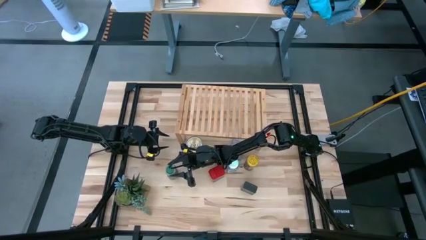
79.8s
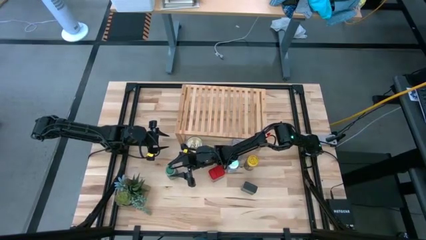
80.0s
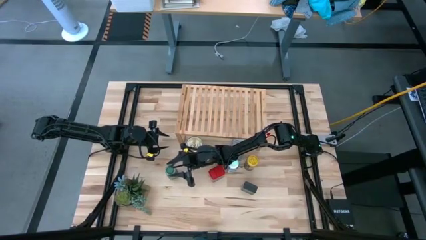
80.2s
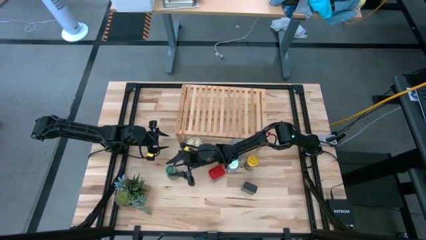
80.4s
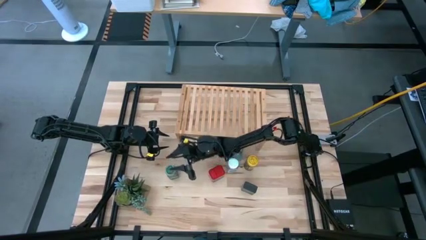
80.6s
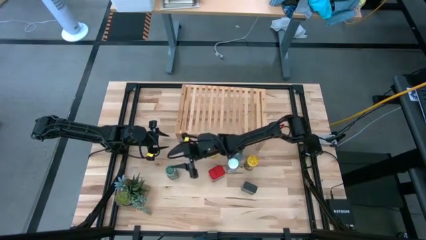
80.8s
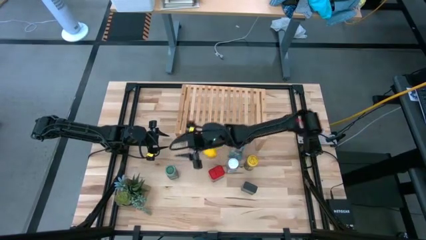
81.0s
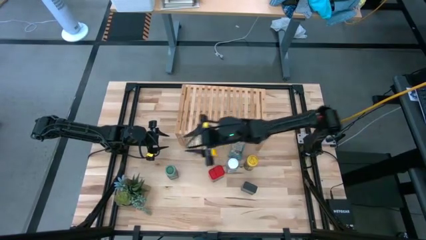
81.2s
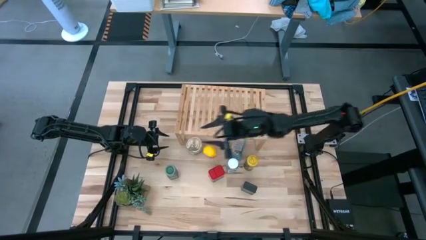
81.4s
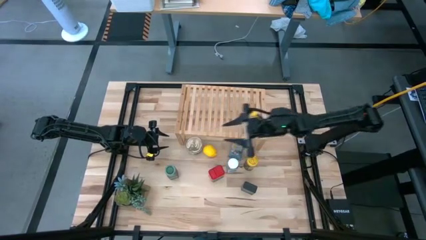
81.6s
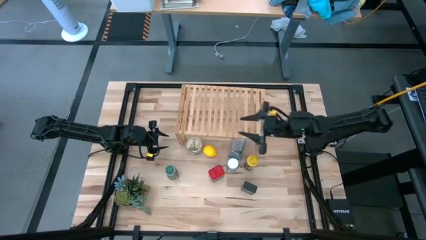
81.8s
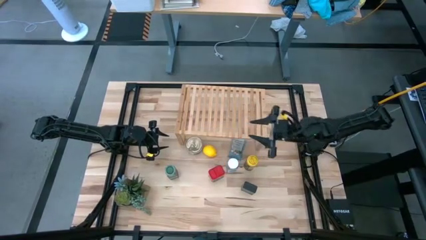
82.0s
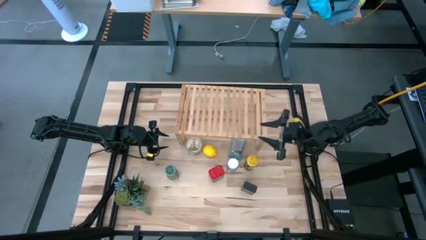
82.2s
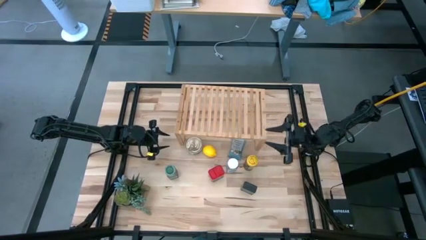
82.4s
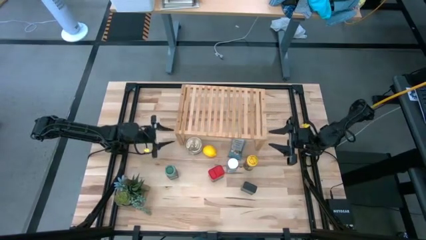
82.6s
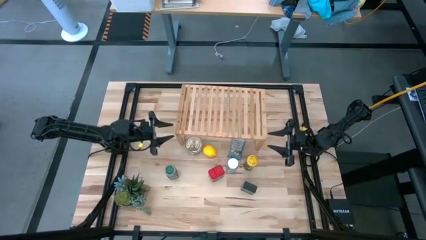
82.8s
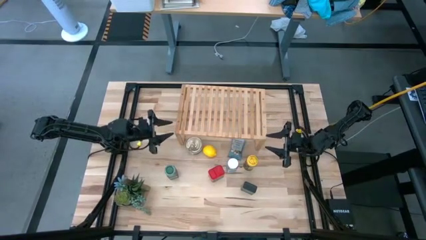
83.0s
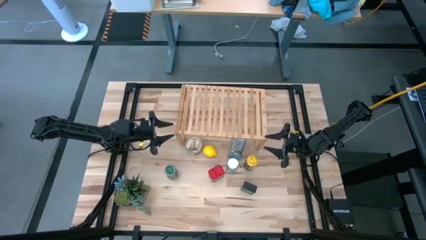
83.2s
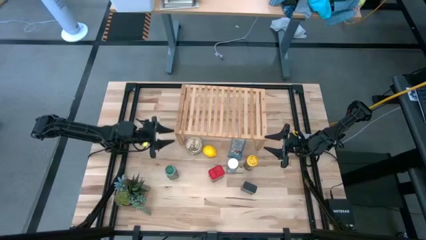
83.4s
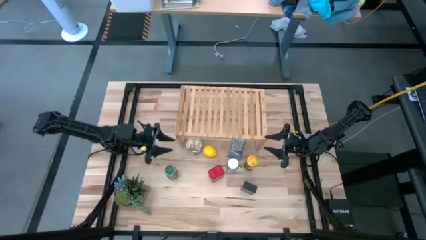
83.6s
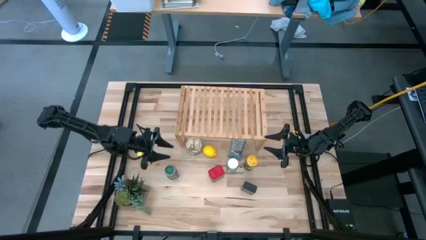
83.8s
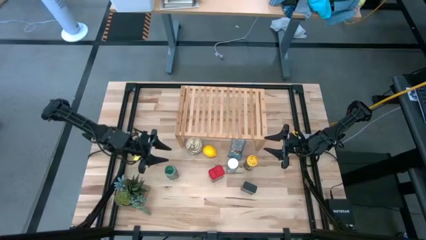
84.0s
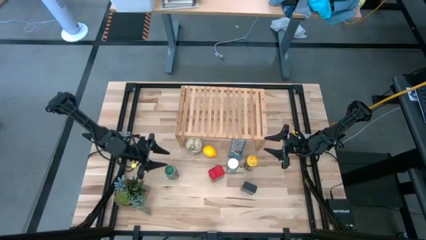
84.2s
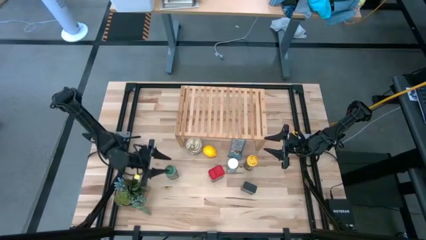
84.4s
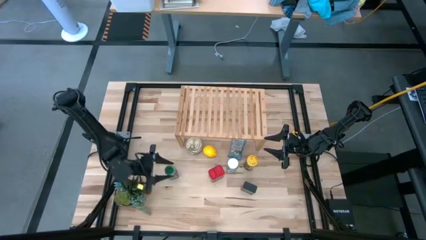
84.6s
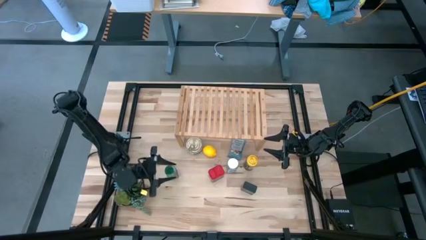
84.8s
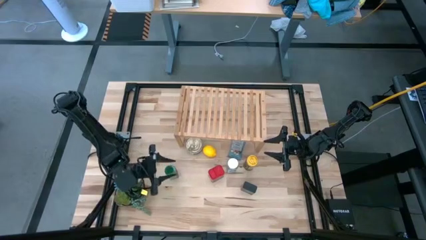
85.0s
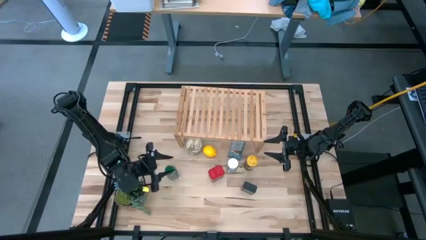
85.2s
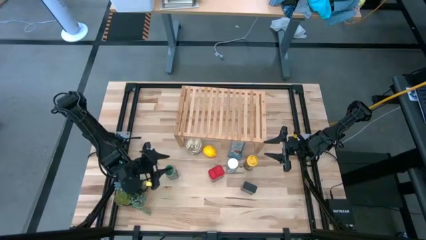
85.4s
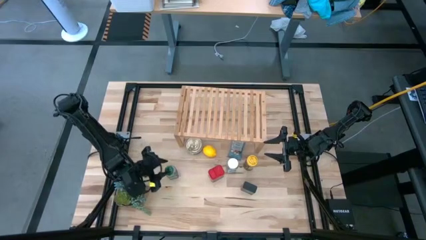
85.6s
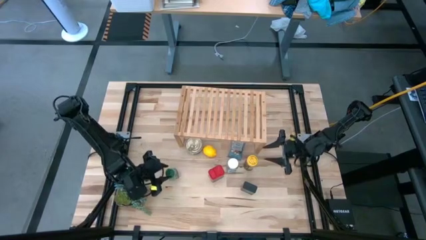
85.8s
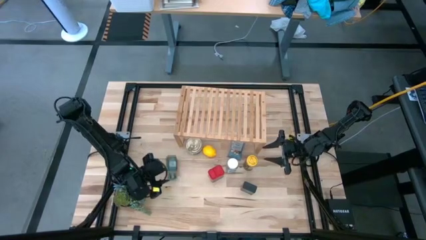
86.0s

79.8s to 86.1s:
Task: Shelf spices
Put the green seasoning bottle on the shelf

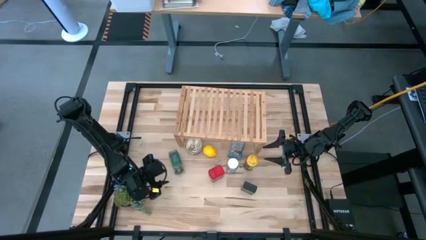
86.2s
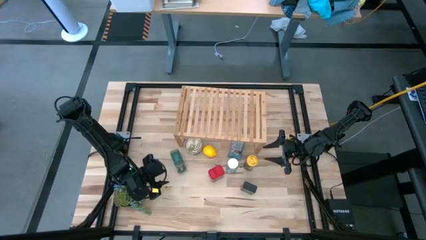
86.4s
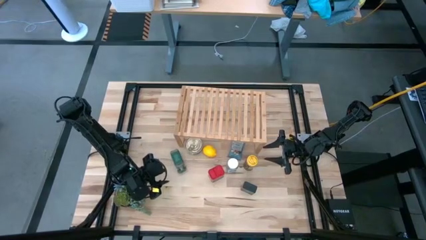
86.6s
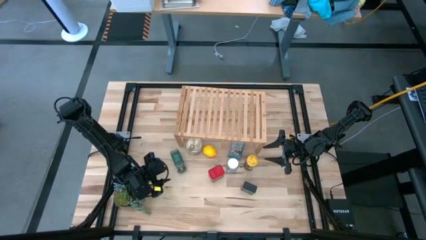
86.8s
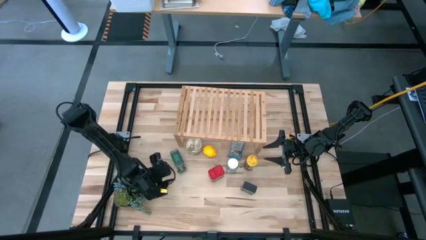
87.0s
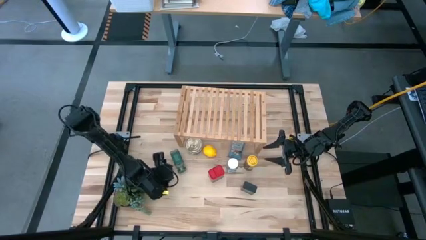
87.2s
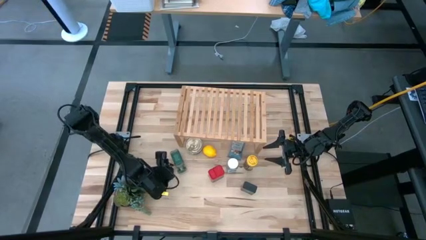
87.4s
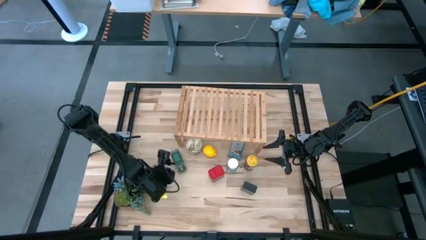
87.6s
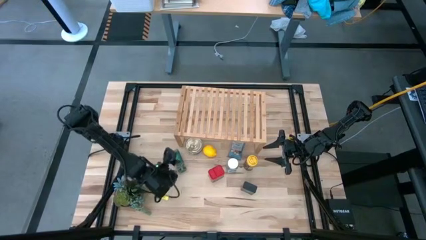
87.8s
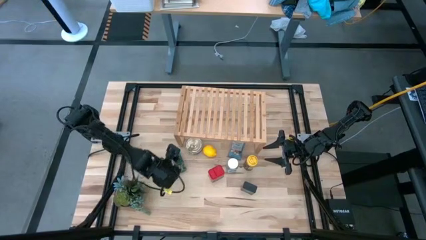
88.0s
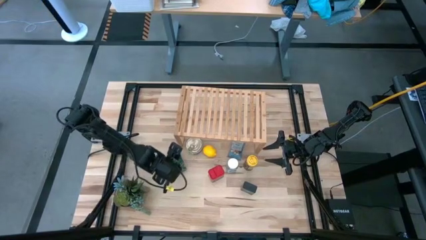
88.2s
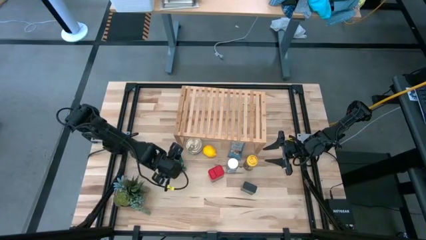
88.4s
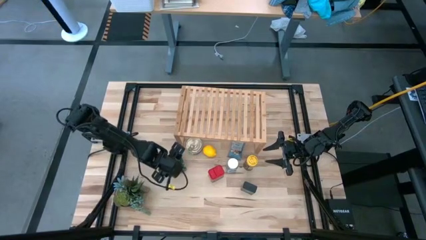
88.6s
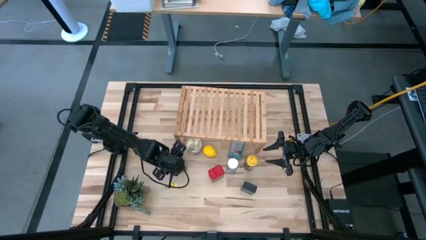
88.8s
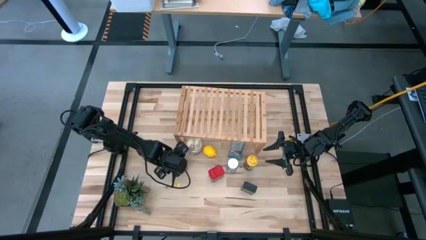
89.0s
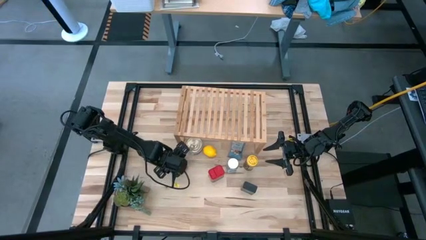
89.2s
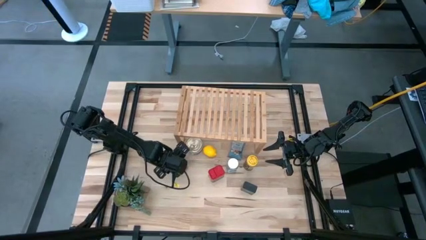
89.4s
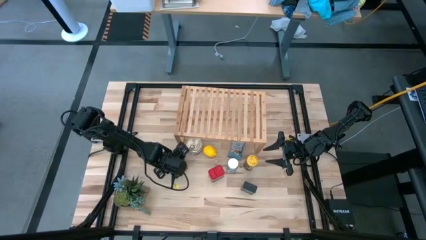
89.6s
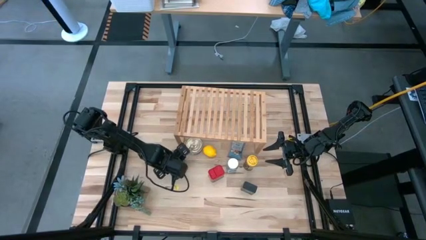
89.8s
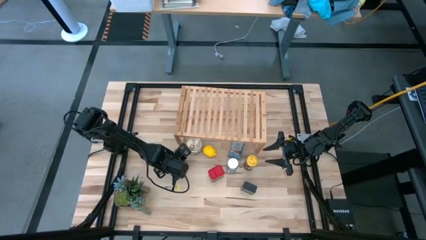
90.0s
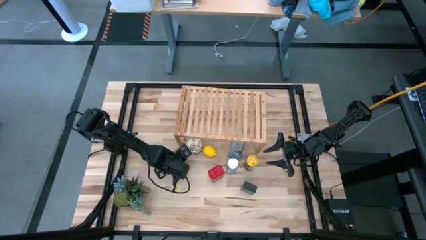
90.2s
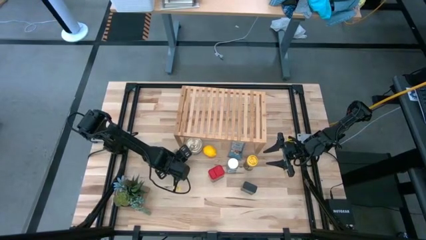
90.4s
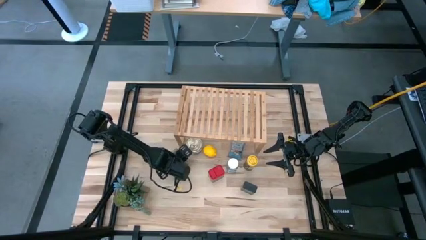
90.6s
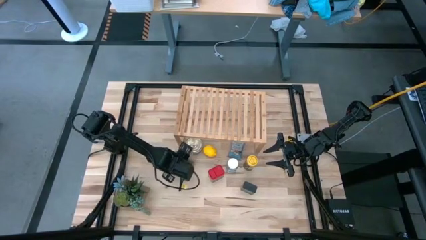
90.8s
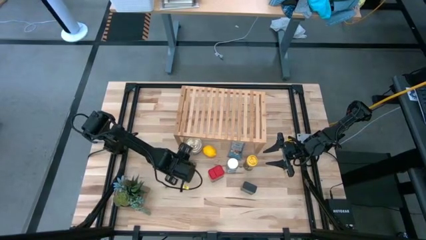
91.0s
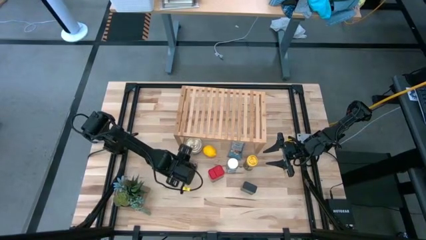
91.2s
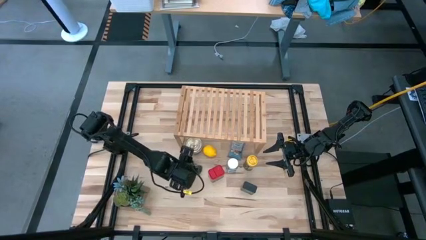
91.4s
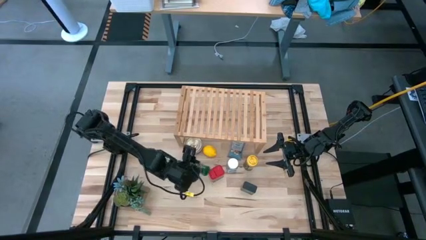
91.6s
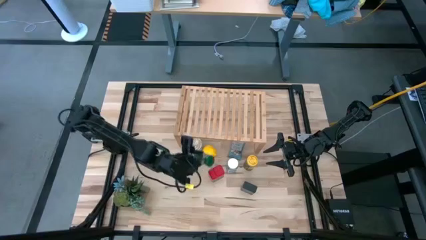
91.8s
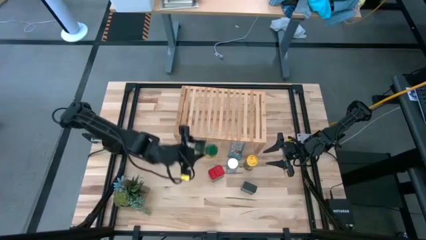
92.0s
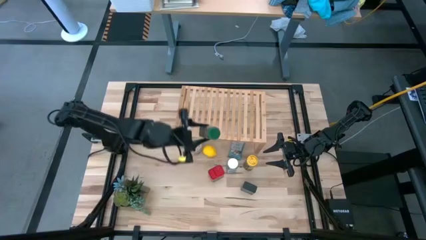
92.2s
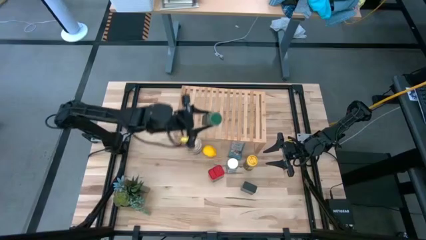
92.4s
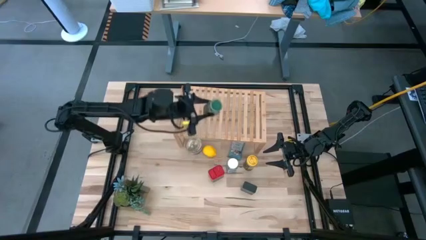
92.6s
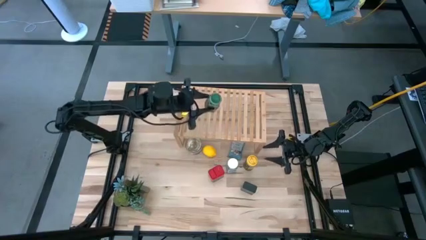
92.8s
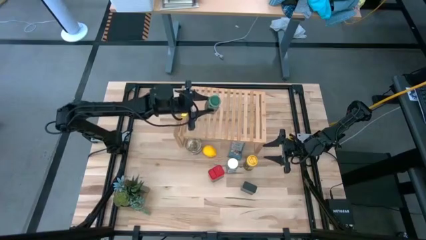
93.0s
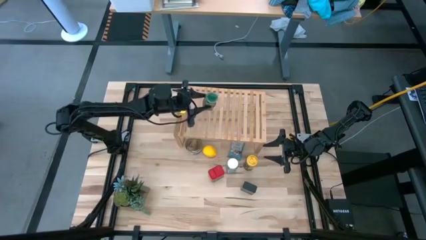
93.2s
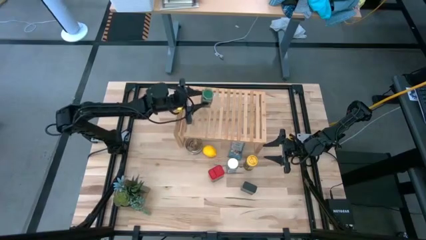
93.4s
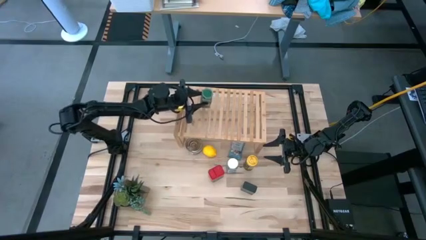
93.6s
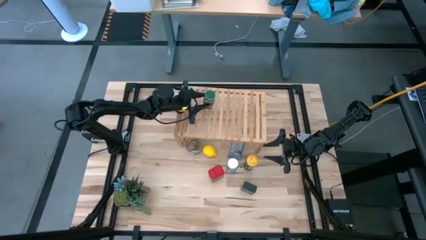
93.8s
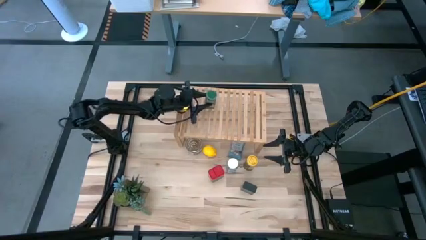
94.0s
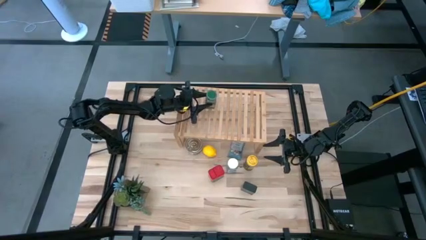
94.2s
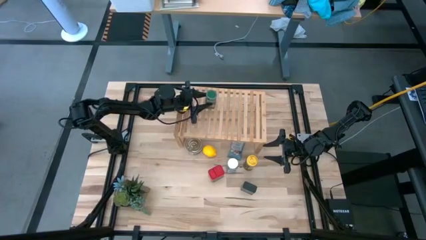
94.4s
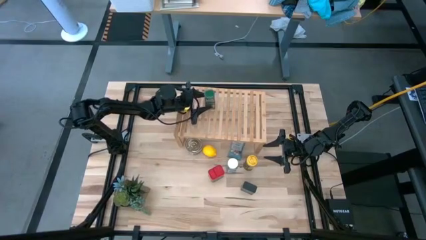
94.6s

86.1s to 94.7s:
Put the green seasoning bottle on the shelf
